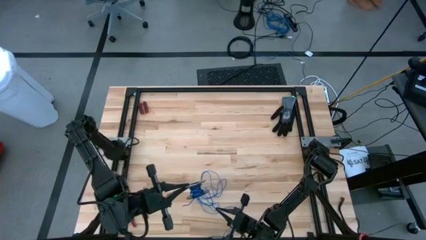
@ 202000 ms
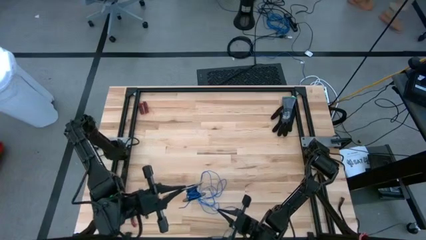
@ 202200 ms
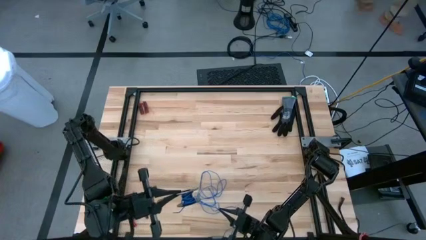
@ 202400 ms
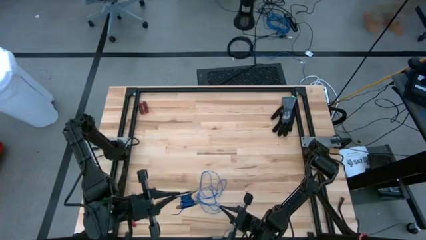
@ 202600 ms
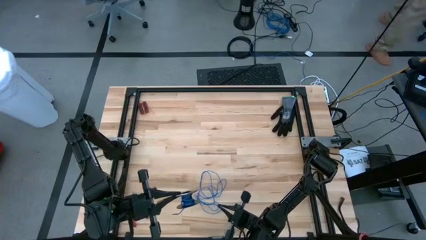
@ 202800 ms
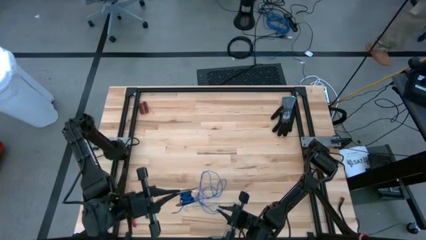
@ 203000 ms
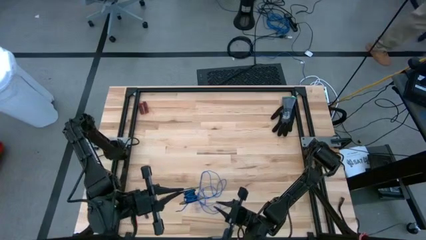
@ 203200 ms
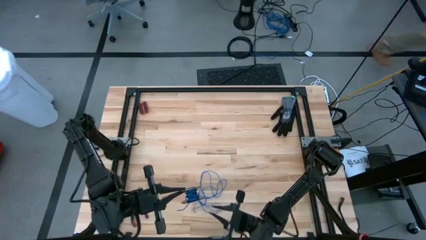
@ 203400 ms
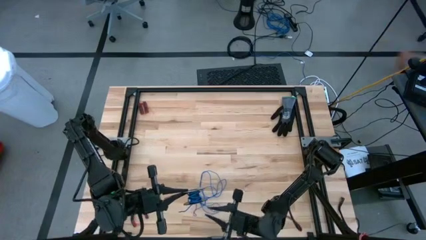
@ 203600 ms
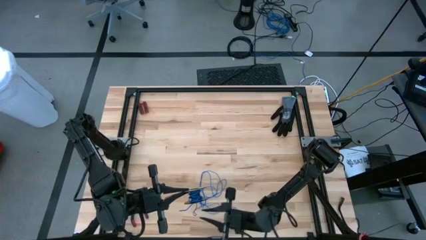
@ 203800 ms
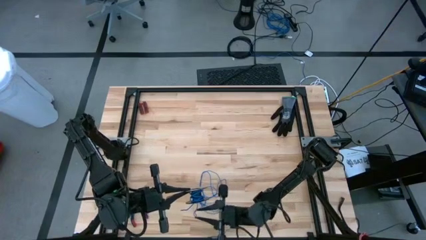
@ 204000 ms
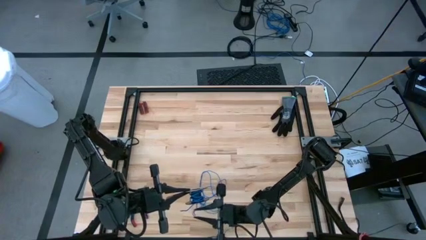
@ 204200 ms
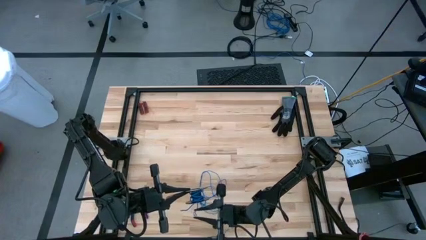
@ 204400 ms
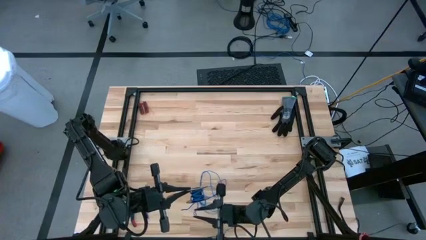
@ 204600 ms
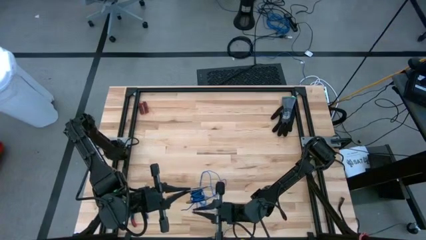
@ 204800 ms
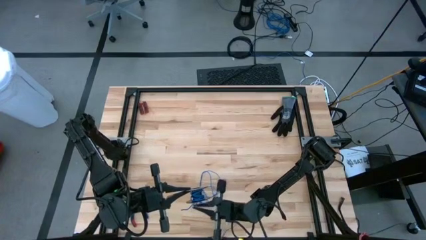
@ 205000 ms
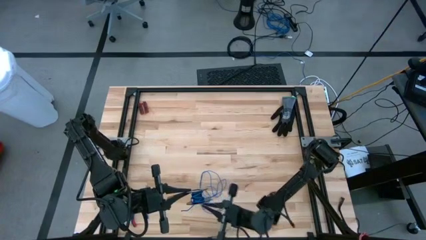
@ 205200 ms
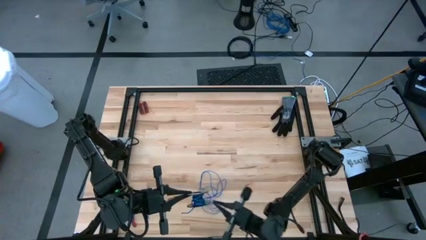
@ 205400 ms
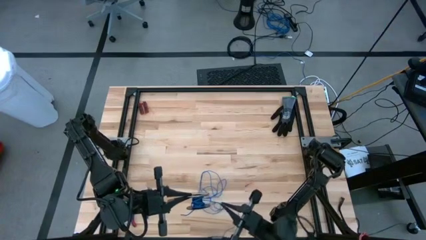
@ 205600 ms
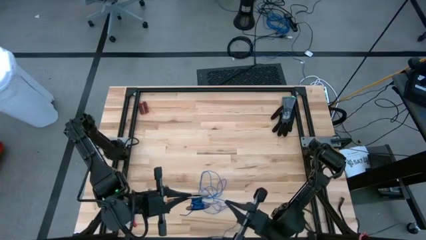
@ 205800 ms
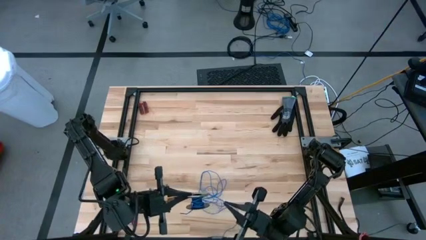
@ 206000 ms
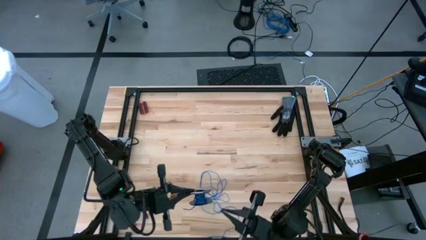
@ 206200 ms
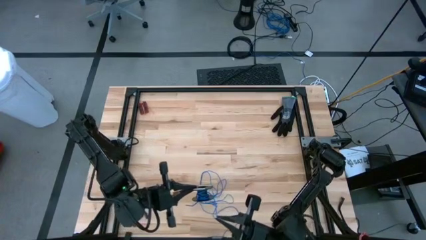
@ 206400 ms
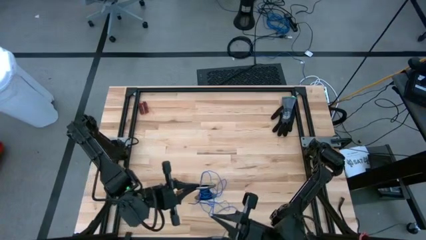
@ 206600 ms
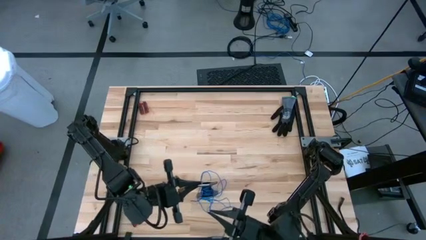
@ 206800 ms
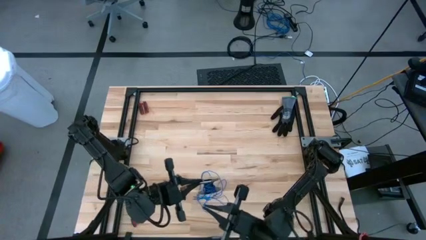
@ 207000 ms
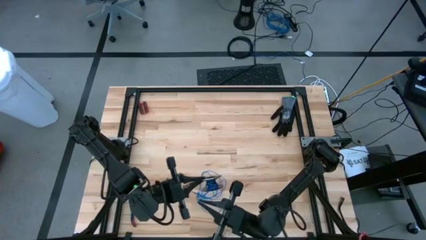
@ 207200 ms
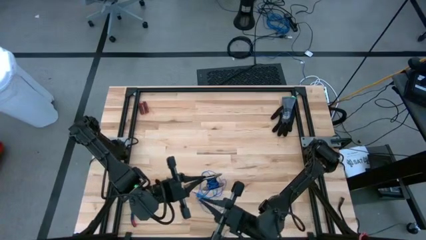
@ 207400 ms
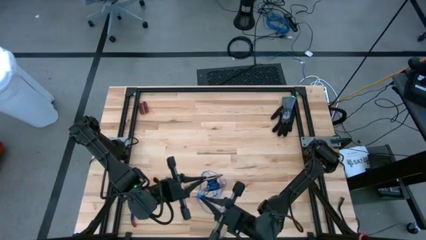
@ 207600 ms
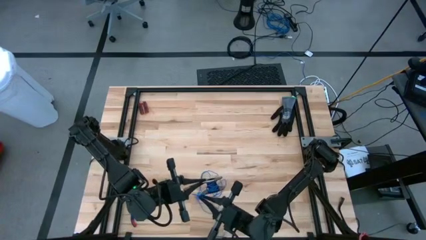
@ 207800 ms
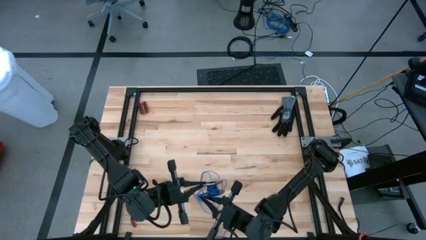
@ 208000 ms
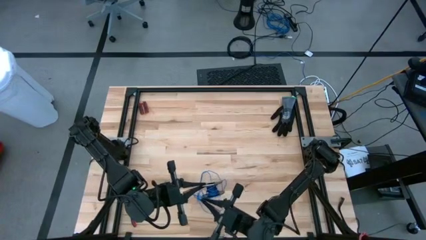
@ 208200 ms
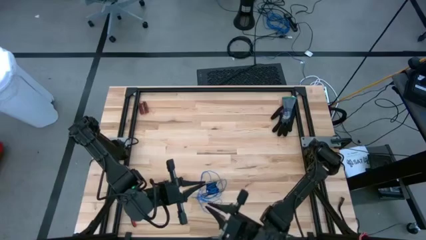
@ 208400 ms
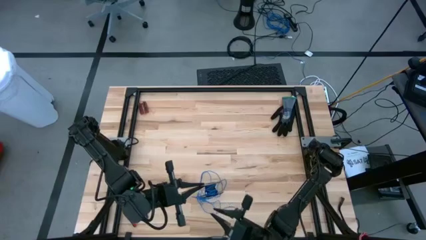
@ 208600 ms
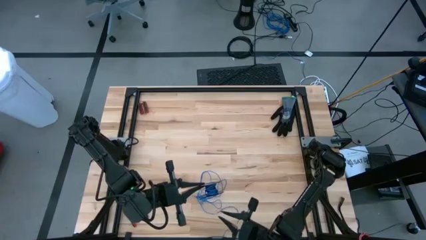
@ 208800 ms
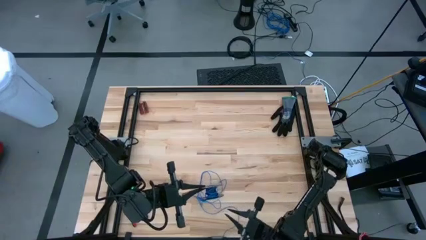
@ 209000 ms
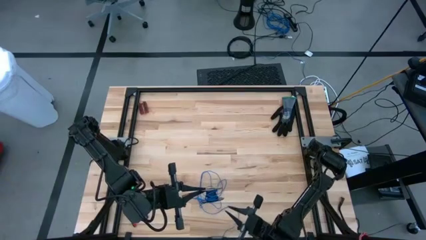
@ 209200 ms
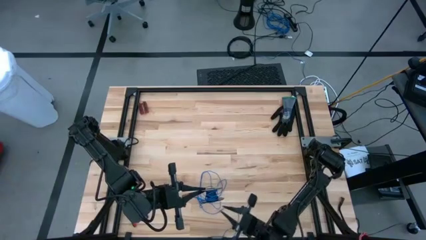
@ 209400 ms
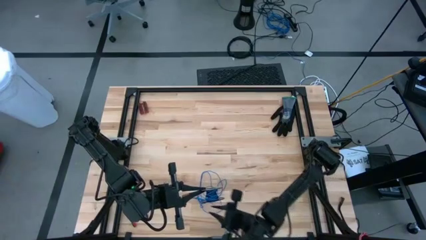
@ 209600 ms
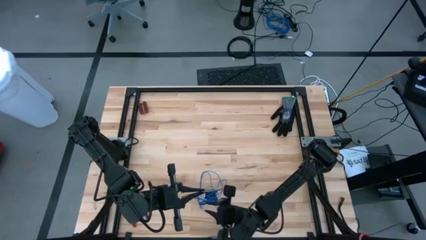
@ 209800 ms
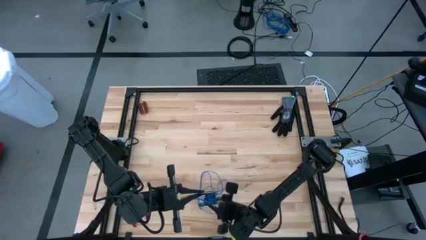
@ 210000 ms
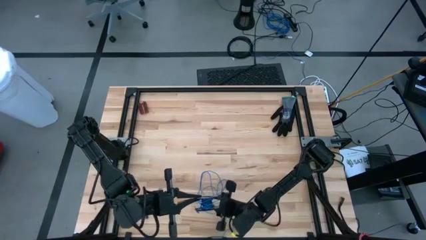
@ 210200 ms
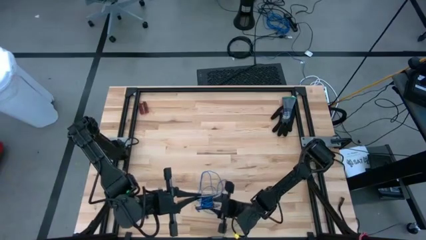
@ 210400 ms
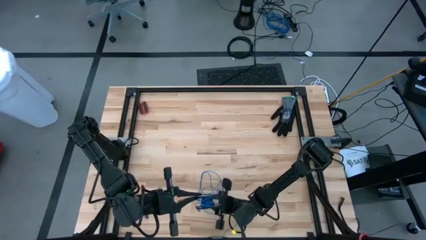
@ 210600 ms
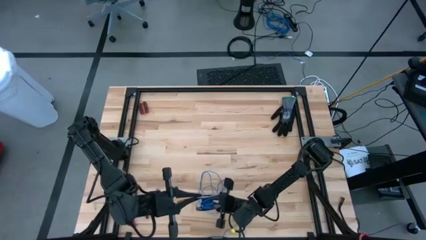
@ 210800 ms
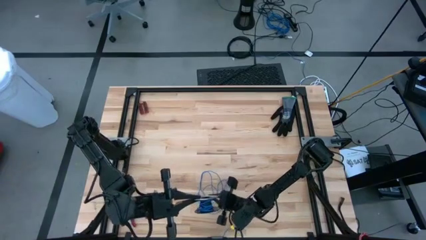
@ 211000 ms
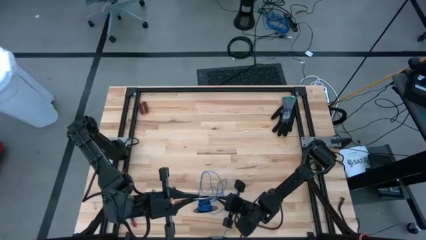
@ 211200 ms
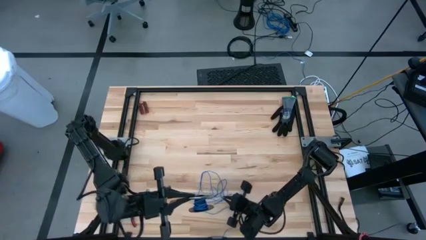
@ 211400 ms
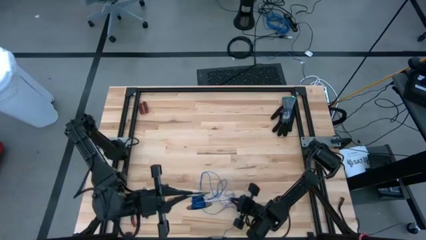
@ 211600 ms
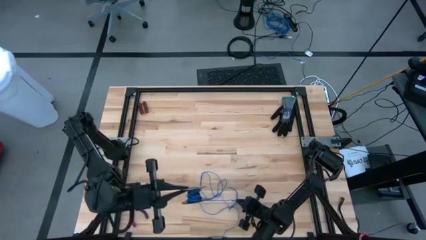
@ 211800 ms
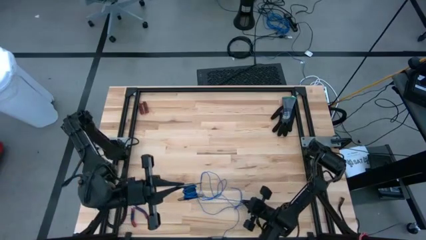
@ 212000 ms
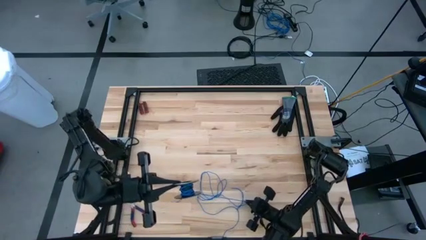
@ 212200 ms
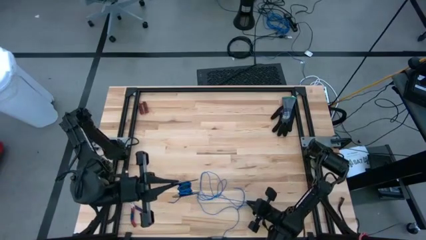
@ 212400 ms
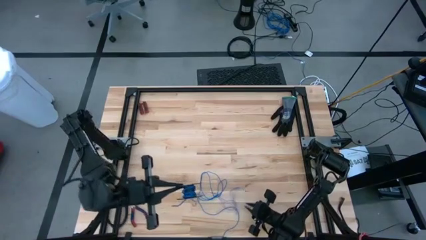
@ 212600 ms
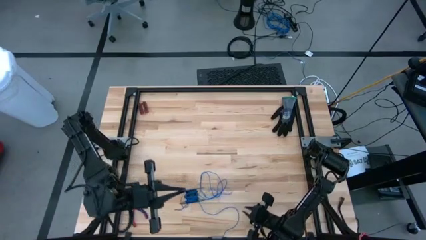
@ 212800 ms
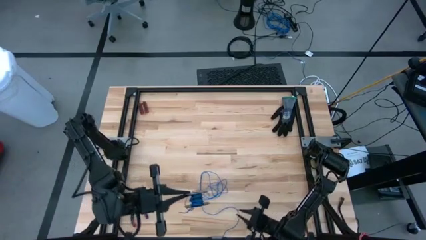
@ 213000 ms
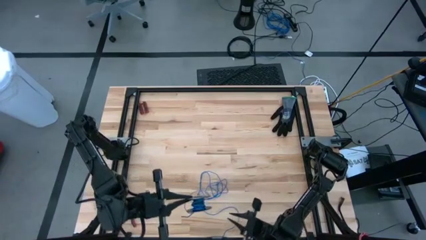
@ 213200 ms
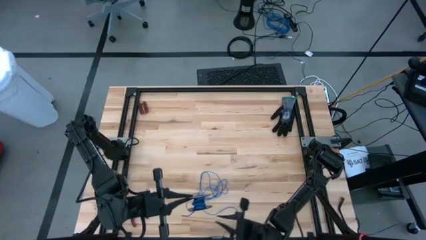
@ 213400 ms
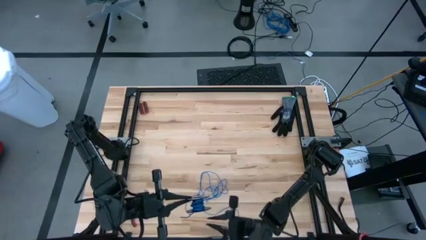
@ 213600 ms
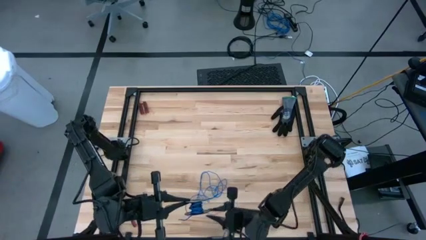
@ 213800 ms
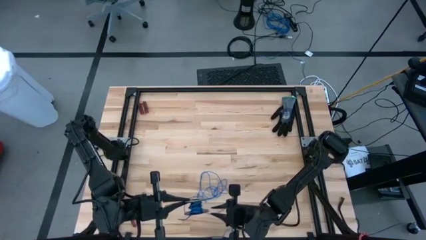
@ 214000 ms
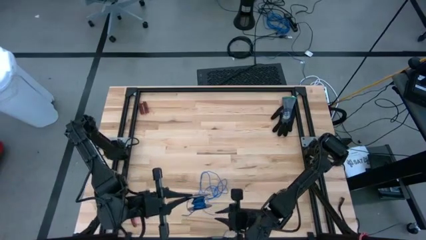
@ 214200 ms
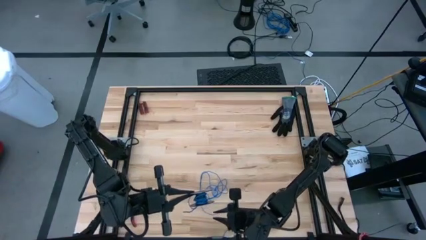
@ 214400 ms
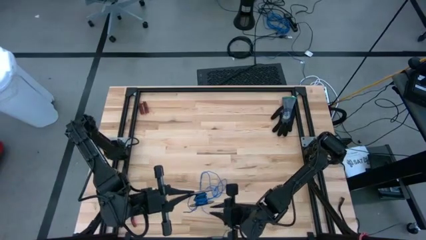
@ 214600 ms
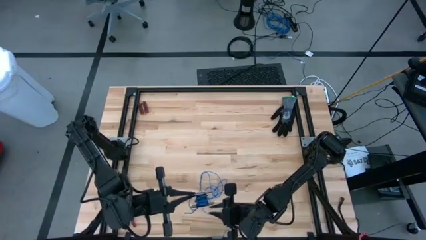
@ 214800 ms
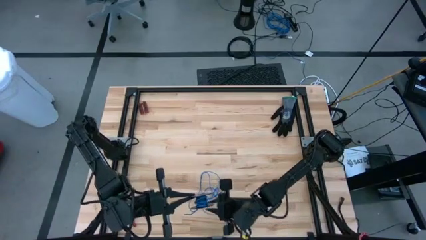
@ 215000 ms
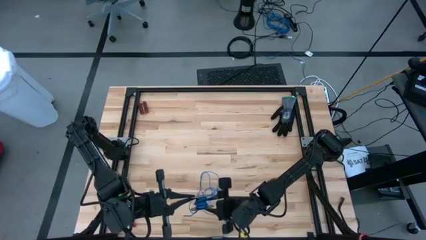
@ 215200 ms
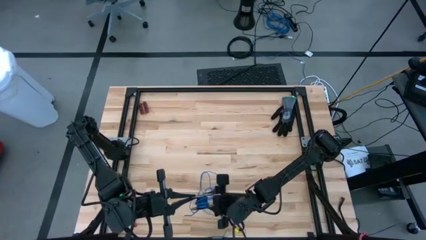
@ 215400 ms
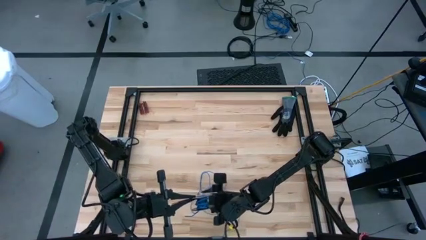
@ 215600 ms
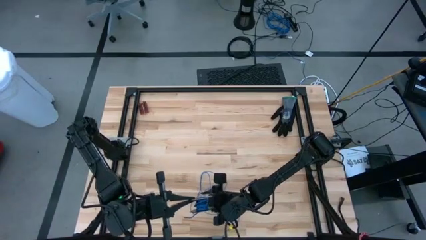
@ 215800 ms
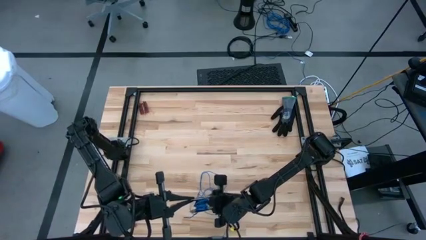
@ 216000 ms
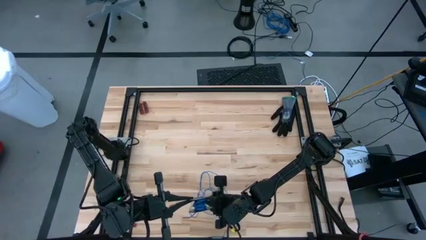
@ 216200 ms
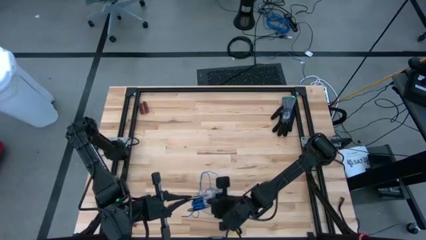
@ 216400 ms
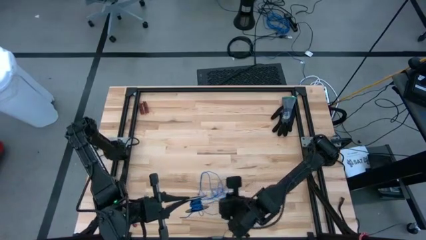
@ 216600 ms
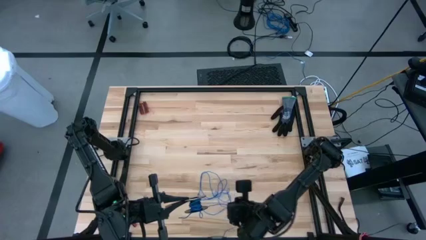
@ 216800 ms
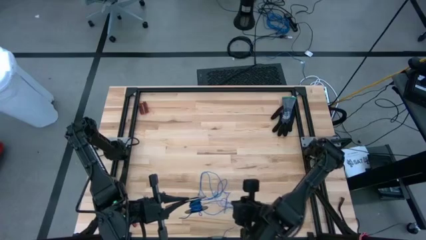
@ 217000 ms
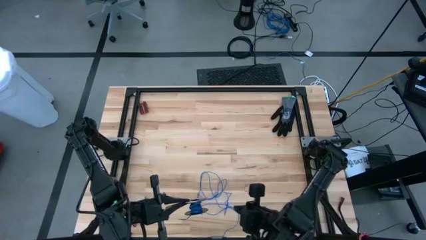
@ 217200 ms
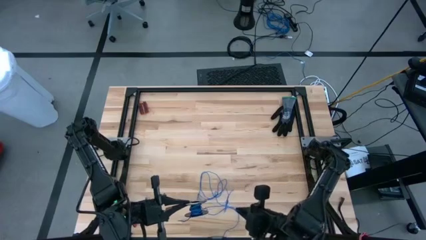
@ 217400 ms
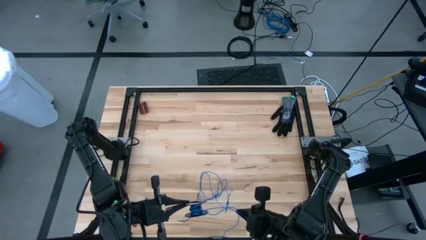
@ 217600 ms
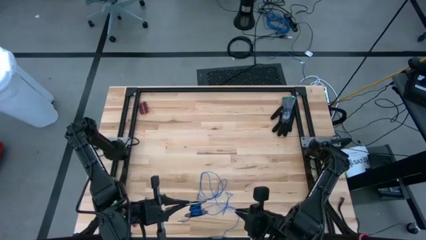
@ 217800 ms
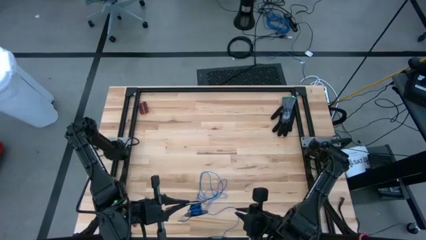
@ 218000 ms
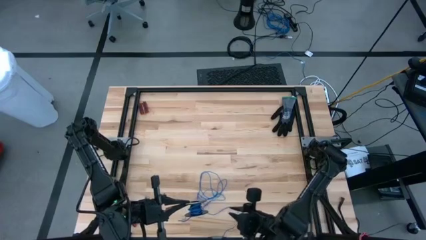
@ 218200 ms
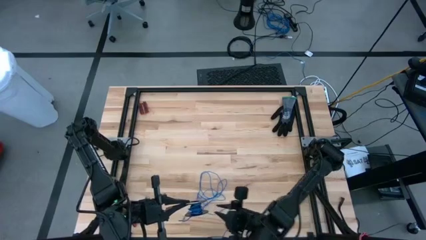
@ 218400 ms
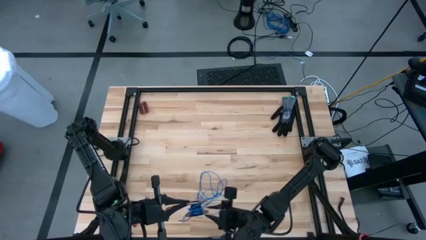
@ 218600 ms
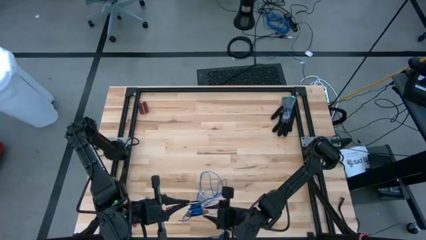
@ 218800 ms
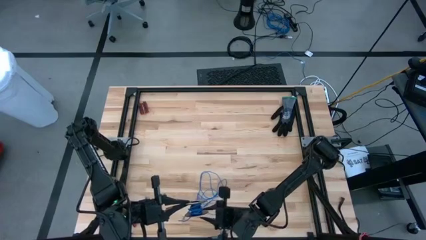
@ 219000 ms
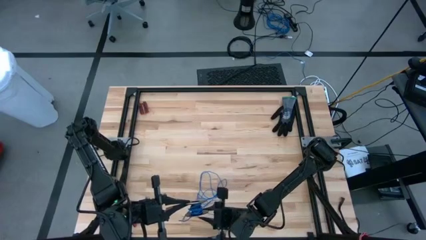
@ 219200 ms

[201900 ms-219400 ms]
Task: Coil cords
Coil the blue wire onto a spool
